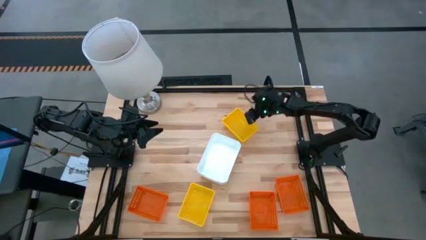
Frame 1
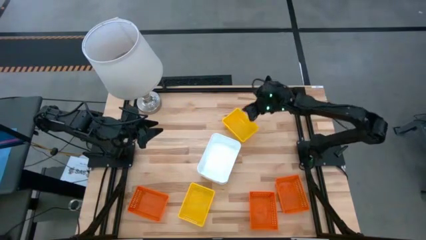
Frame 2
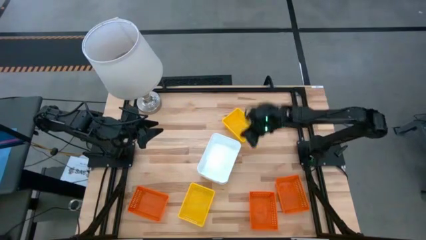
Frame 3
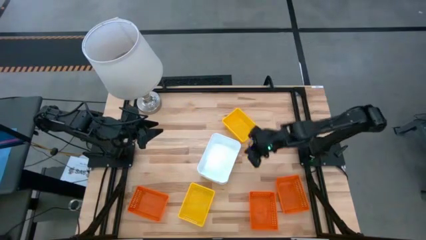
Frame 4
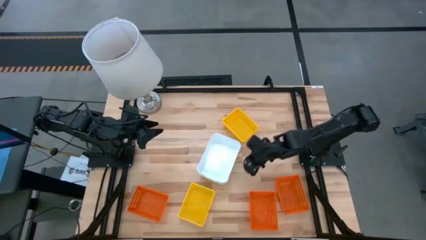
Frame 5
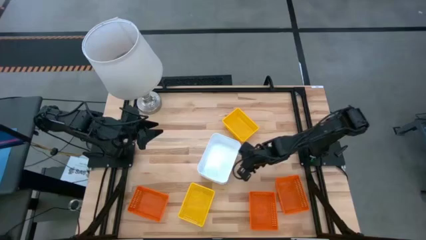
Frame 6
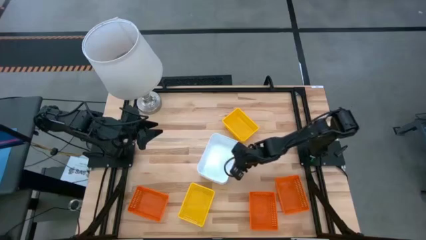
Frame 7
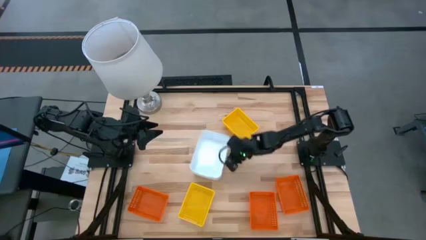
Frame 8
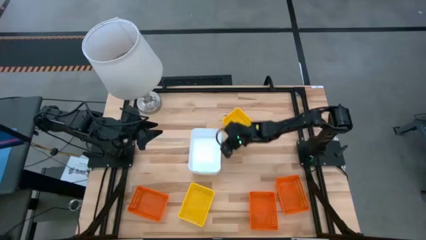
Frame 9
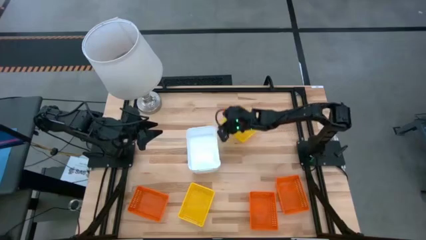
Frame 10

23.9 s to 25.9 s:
Adjust the stacked white bins

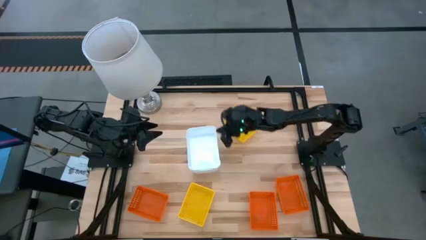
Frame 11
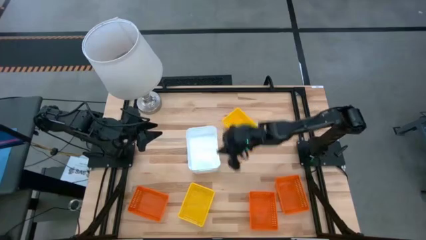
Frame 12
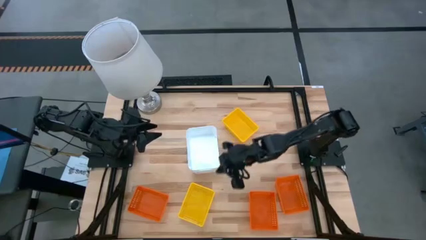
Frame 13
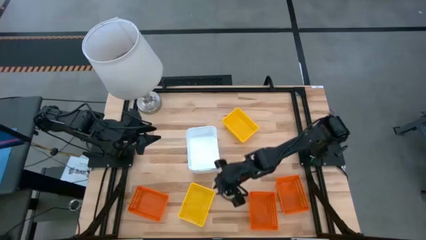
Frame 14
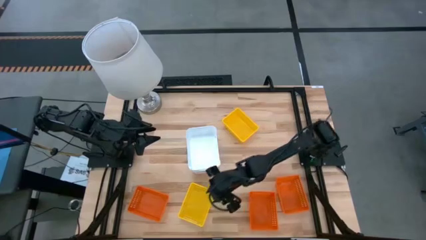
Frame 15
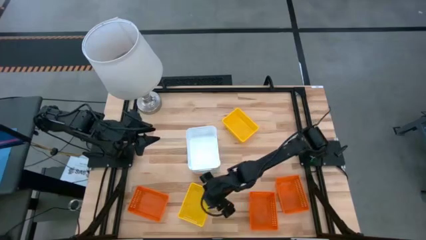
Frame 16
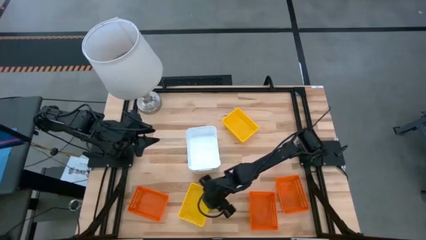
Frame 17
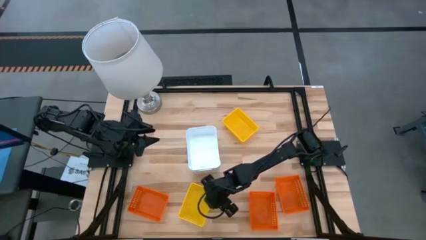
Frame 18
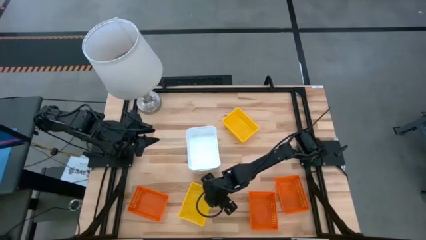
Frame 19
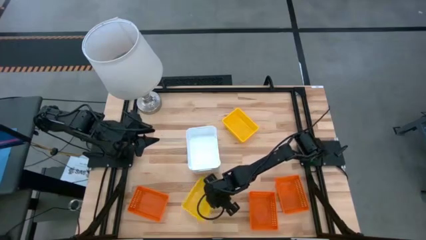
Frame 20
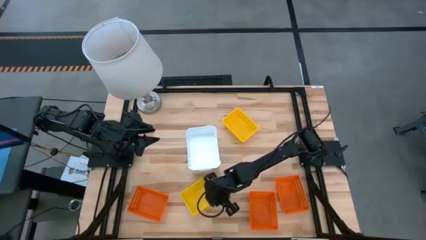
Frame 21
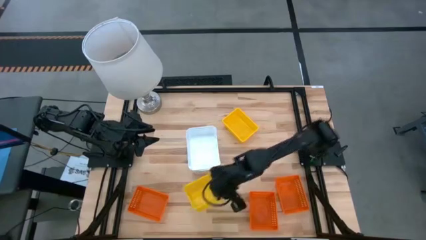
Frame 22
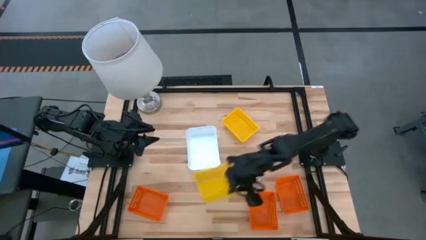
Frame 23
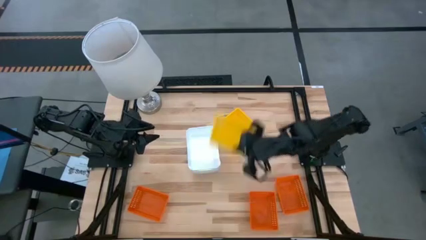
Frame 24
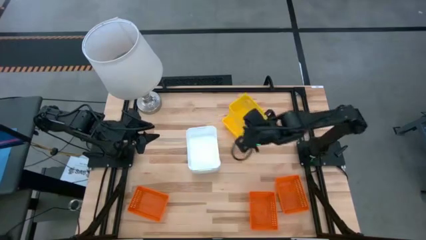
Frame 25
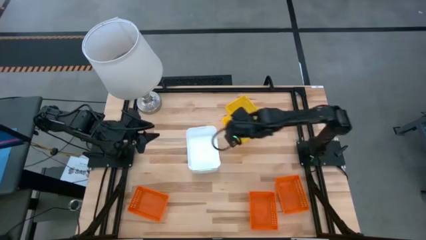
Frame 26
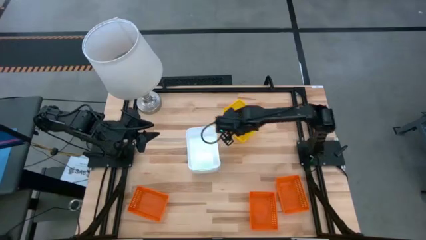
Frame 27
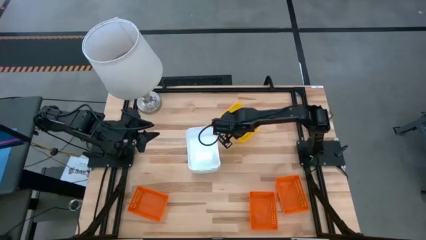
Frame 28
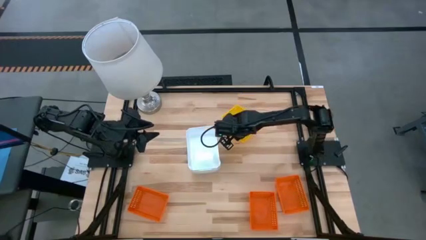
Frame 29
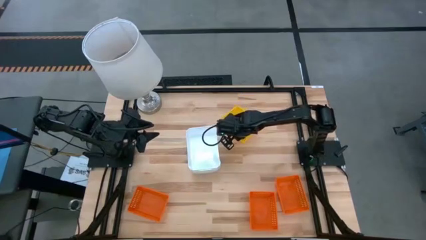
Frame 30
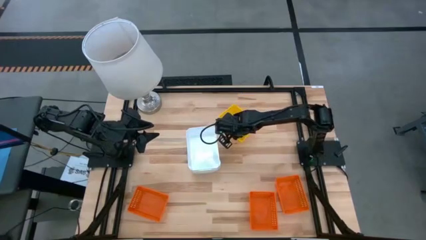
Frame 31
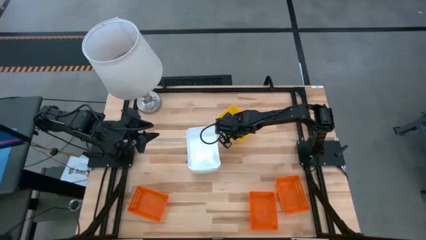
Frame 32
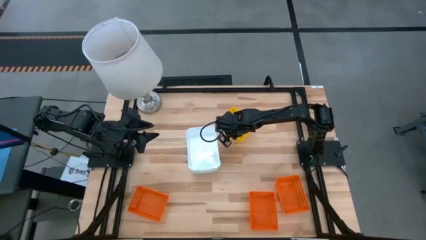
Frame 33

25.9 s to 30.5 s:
Stack the bottom yellow bin on the top yellow bins

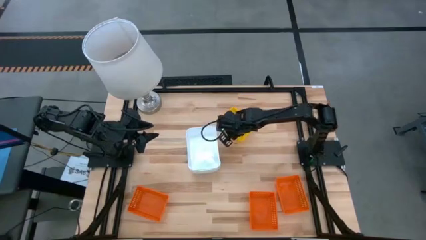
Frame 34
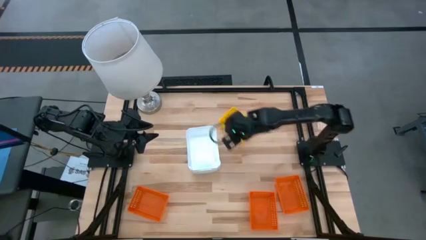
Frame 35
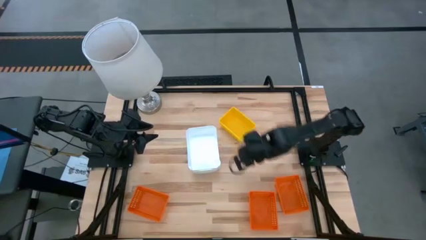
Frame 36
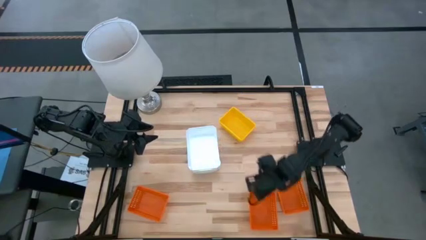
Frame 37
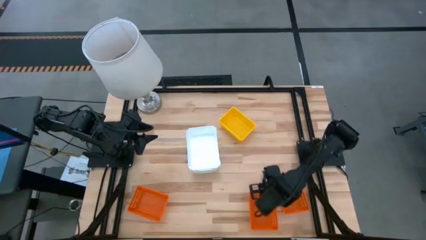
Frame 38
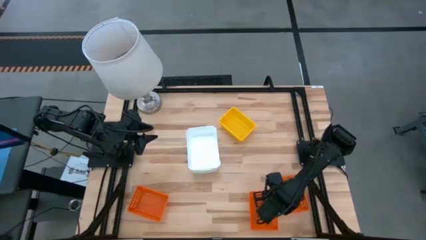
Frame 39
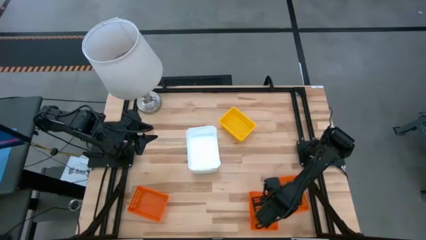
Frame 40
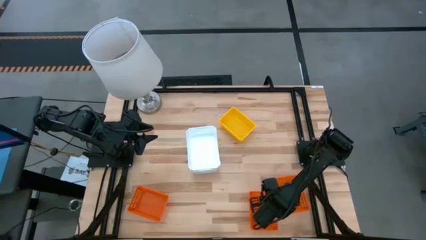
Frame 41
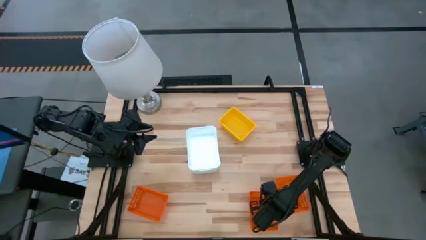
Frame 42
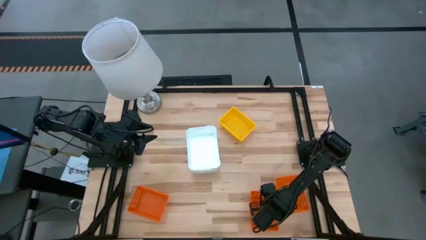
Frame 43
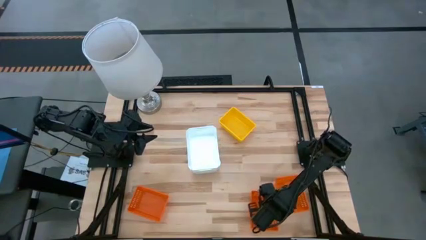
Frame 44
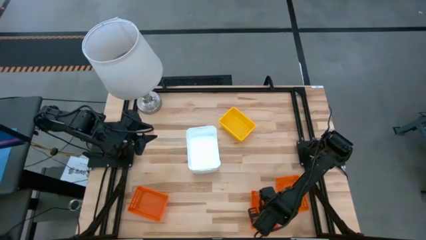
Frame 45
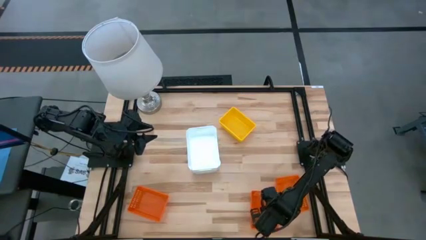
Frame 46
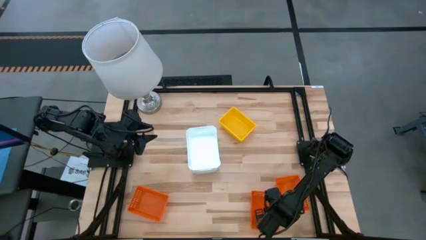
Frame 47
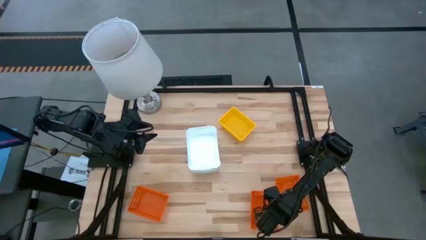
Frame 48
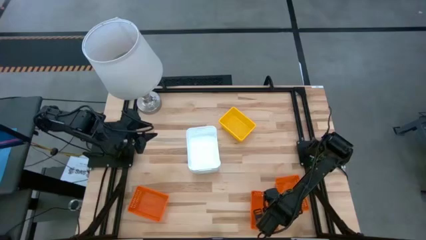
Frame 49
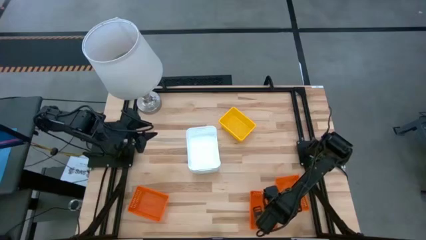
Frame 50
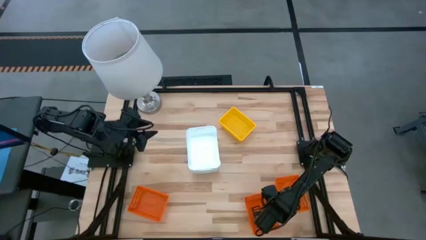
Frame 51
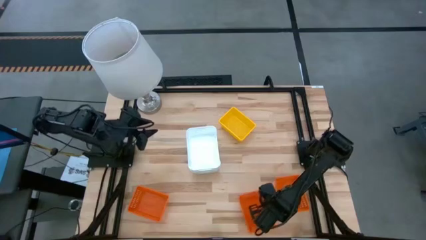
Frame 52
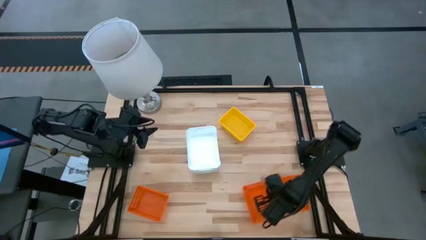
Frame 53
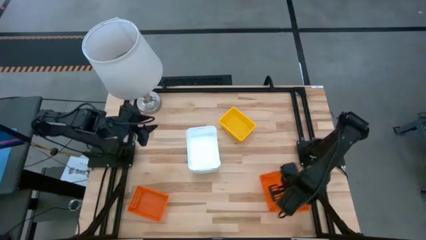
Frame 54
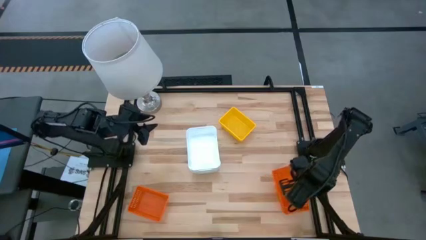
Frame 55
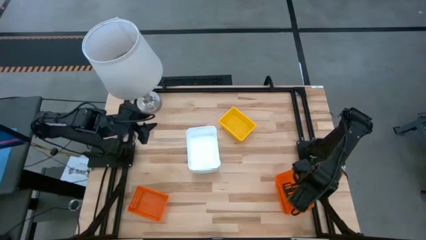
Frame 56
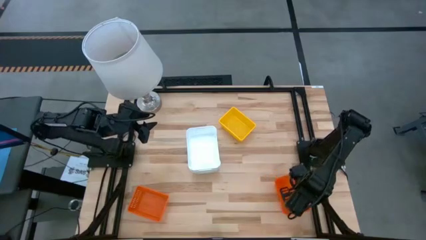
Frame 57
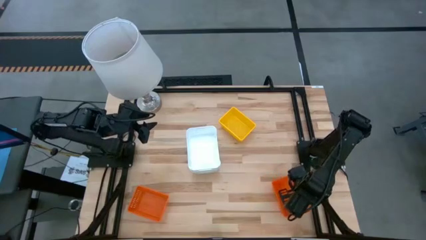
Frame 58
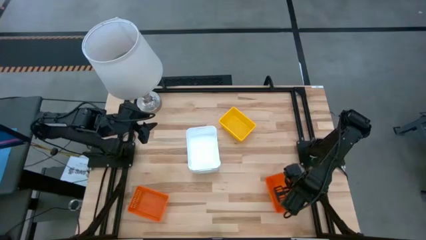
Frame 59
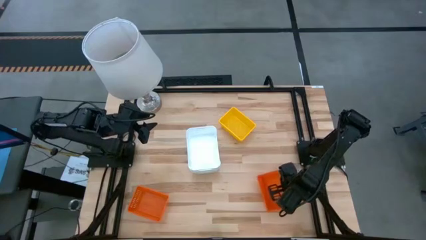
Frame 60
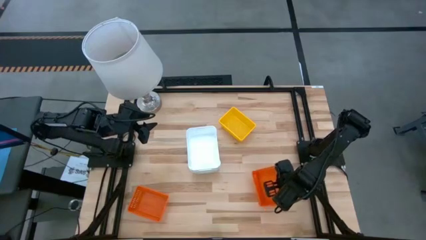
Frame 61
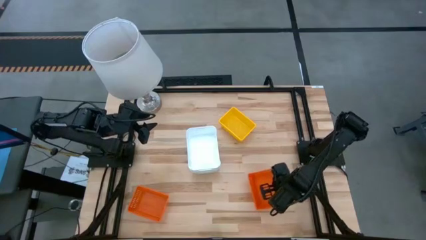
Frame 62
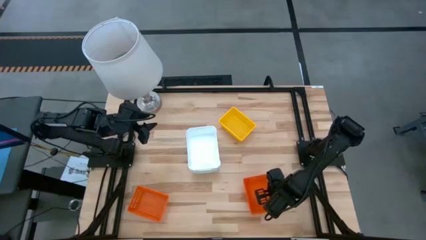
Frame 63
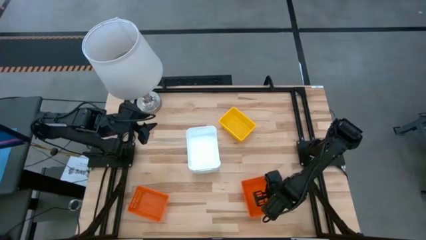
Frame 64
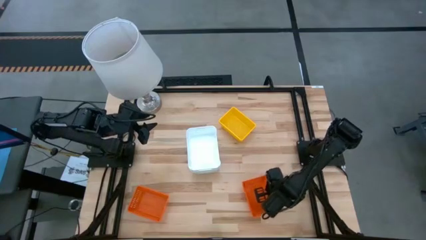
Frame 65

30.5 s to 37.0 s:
Stack the middle orange bin on the right orange bin
